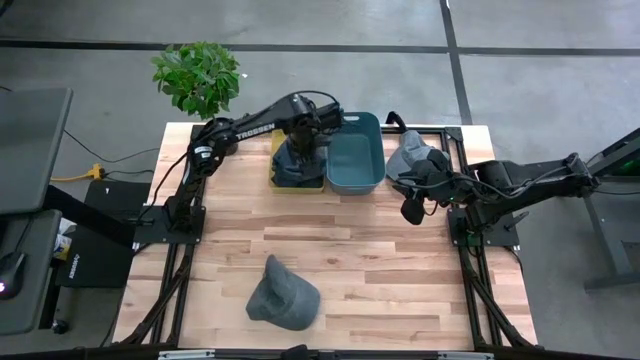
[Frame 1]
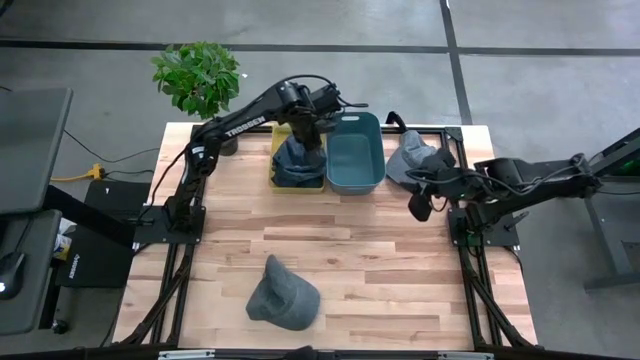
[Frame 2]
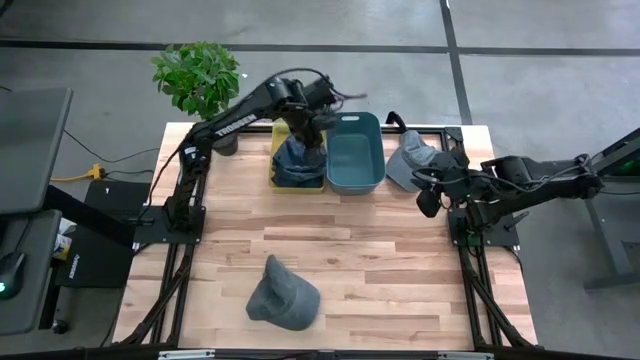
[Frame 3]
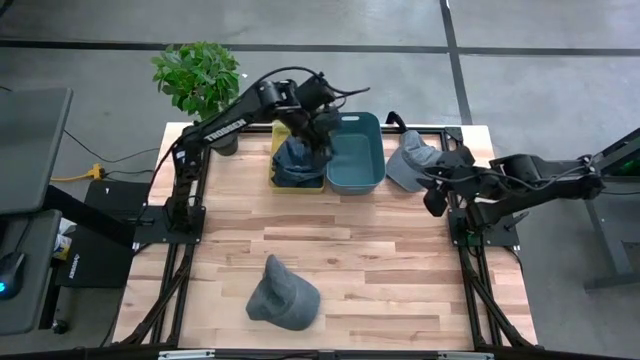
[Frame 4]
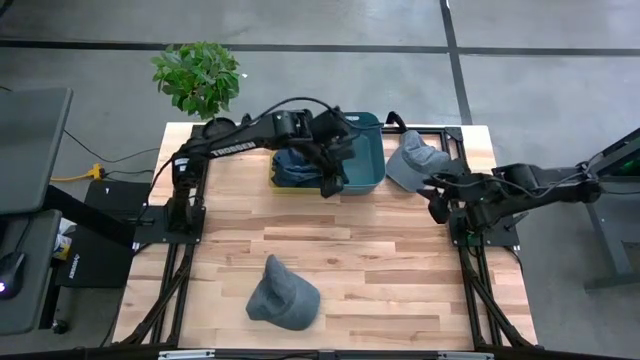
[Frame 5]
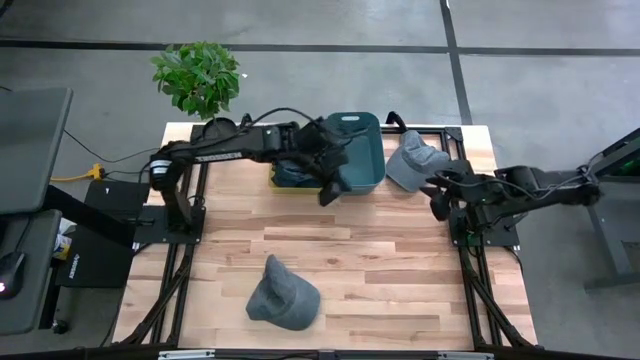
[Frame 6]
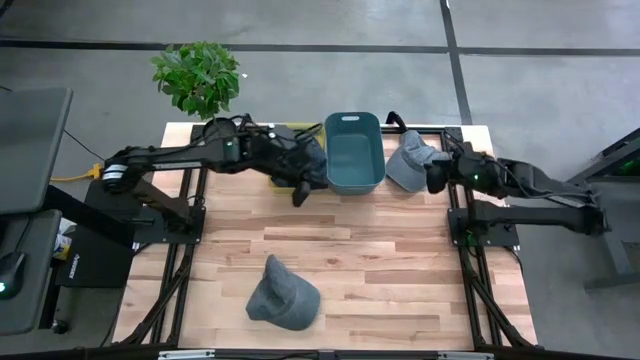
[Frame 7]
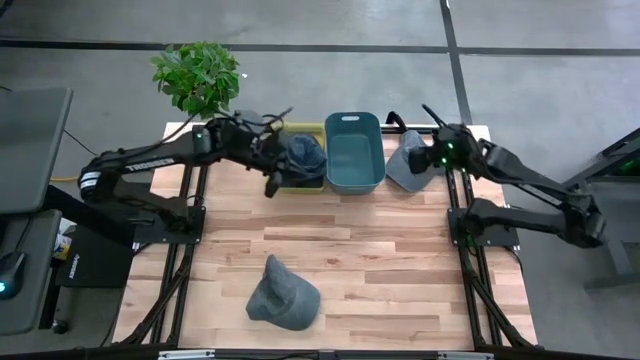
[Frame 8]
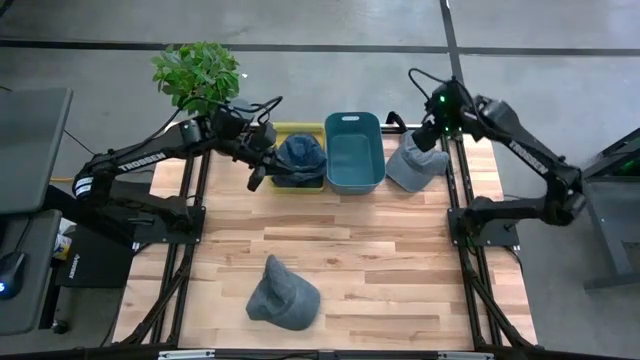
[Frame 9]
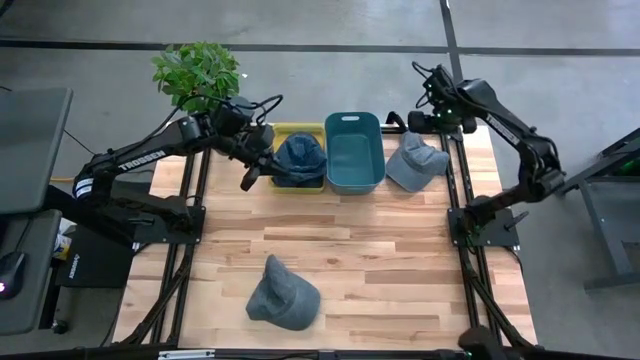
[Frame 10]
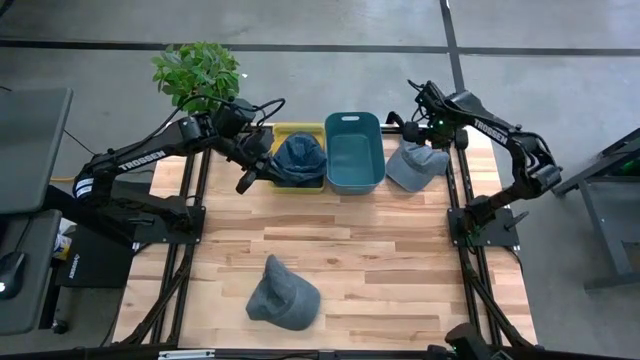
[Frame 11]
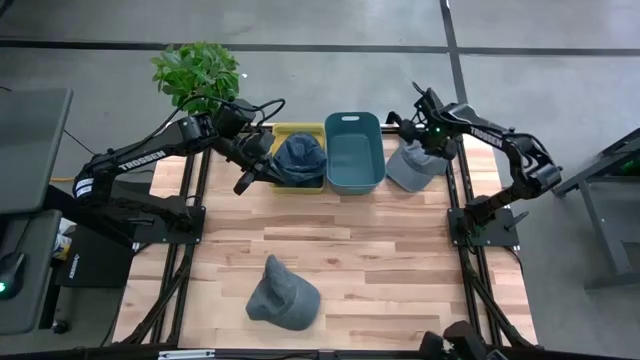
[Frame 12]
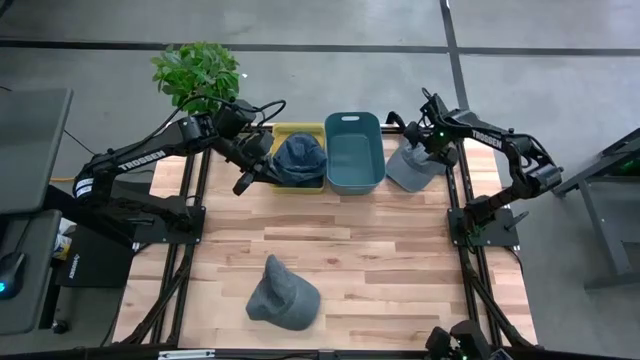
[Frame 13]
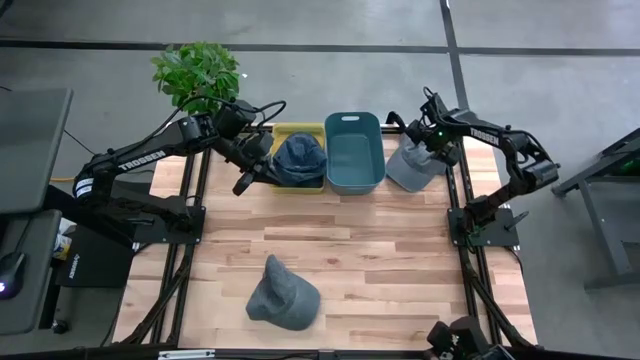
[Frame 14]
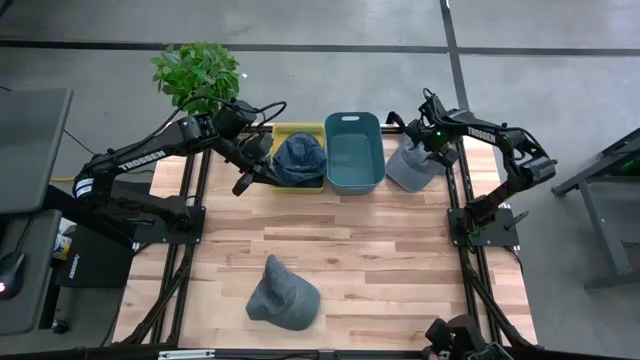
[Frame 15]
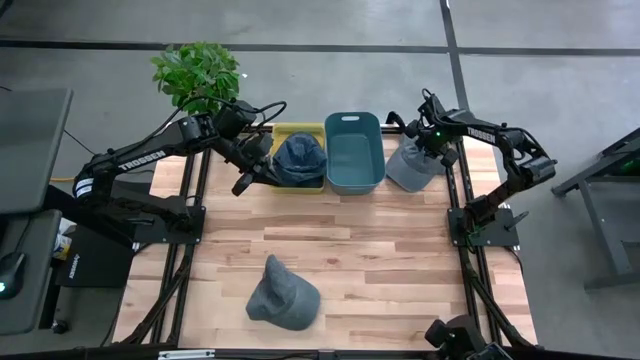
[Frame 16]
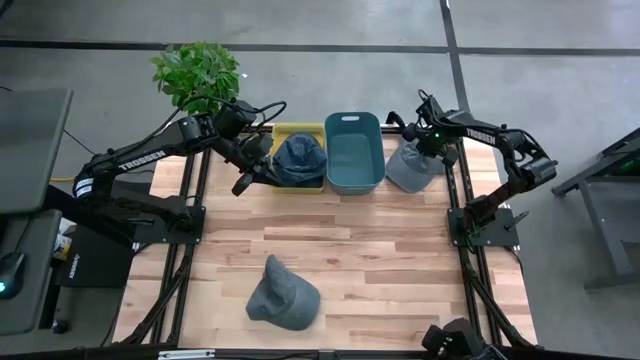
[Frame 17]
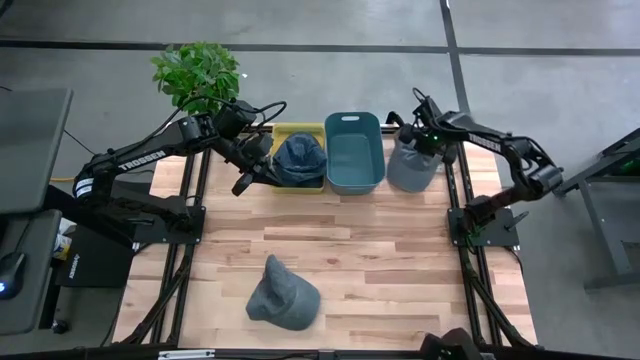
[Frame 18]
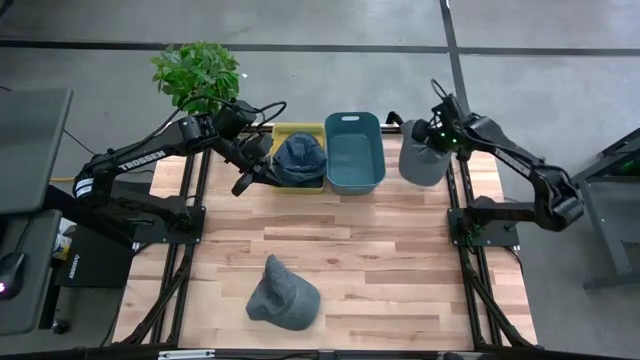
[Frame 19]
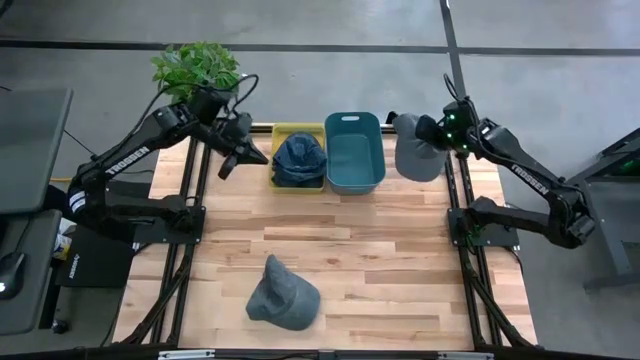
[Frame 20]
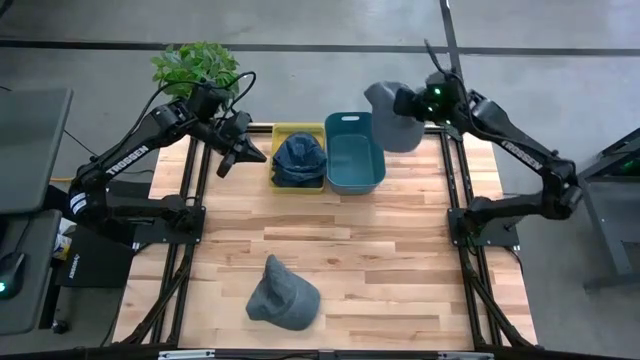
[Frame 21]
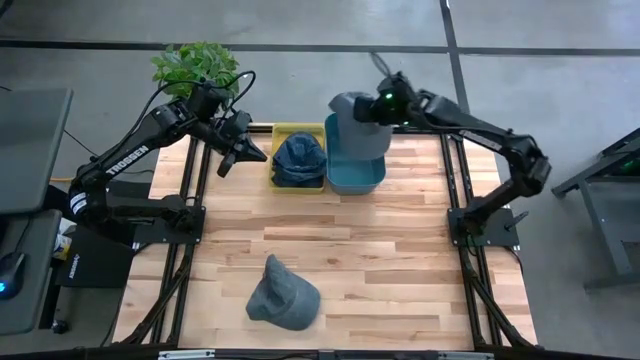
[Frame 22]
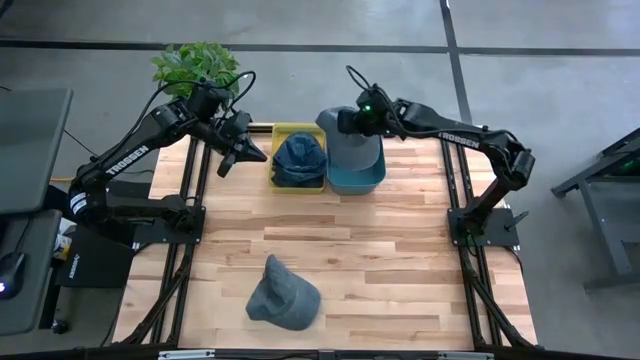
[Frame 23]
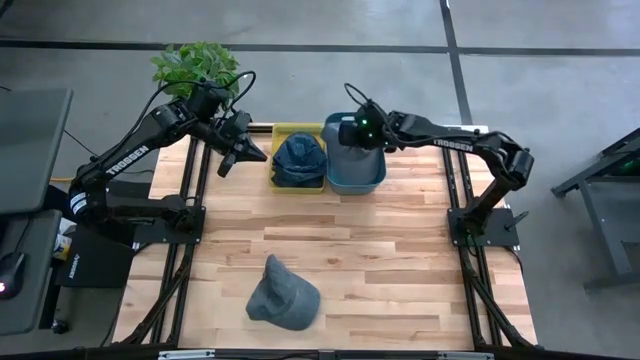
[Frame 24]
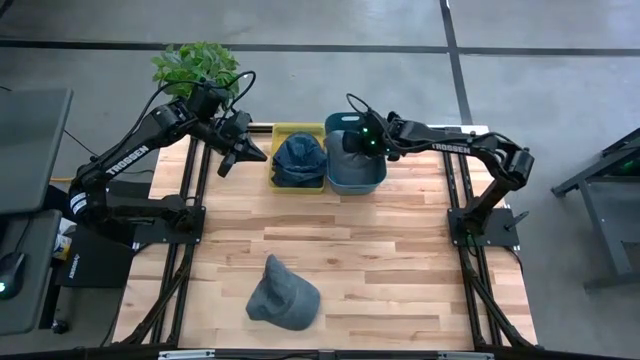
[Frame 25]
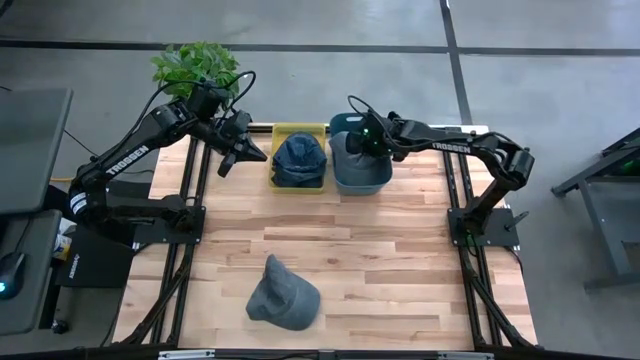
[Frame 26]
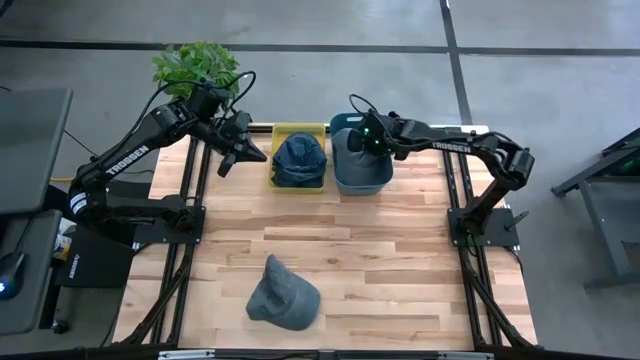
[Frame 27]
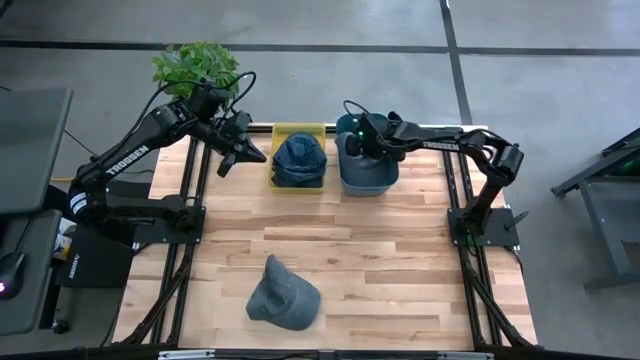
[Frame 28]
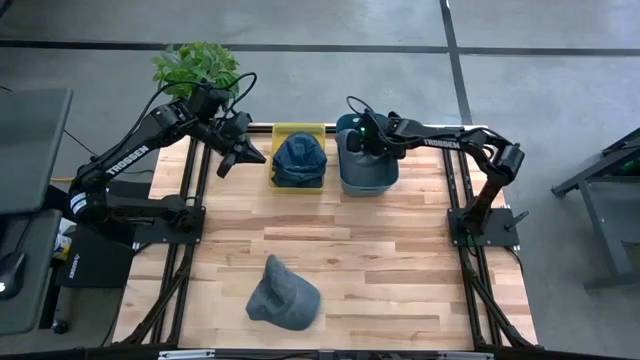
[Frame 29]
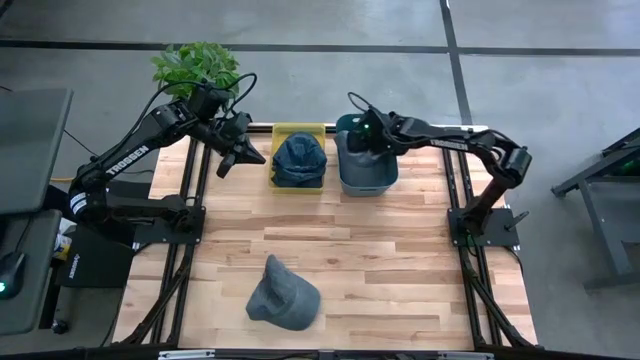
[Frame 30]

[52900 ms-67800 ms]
Task: Pick & Place hat
Put the top gray cap into the blue green bin
